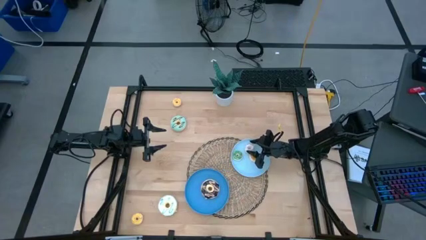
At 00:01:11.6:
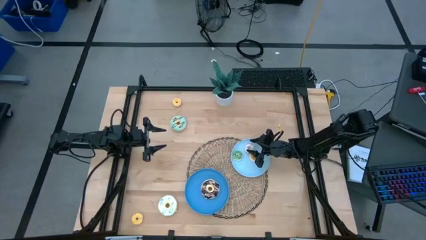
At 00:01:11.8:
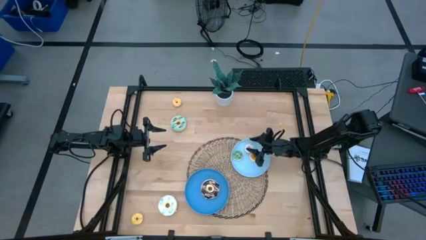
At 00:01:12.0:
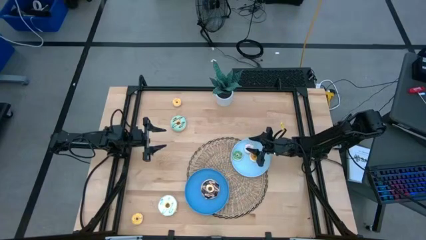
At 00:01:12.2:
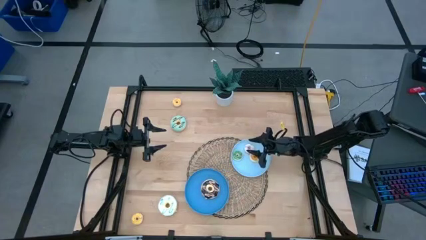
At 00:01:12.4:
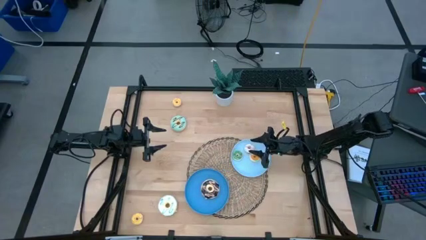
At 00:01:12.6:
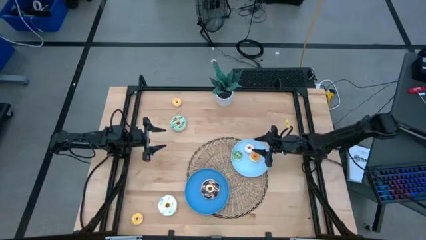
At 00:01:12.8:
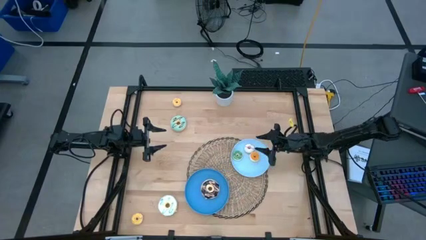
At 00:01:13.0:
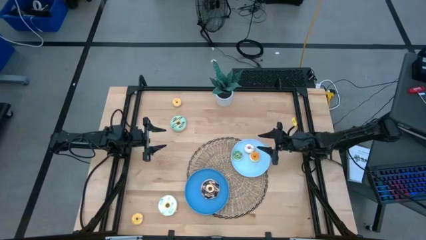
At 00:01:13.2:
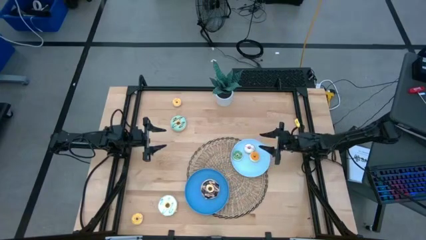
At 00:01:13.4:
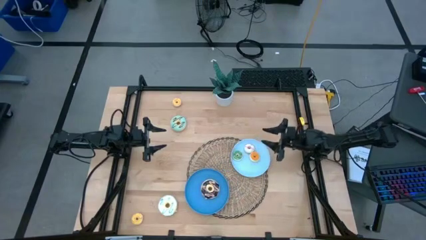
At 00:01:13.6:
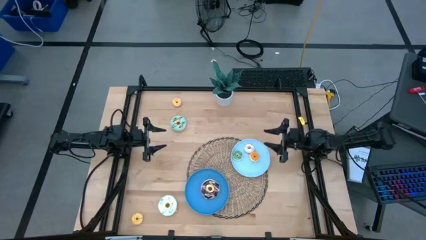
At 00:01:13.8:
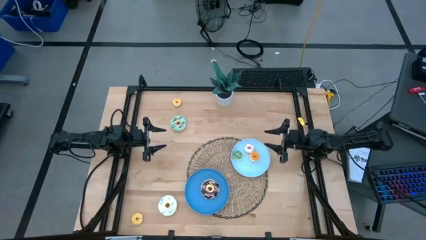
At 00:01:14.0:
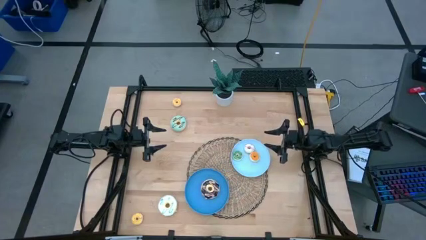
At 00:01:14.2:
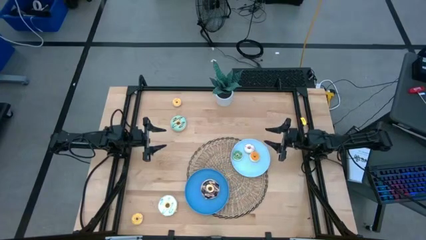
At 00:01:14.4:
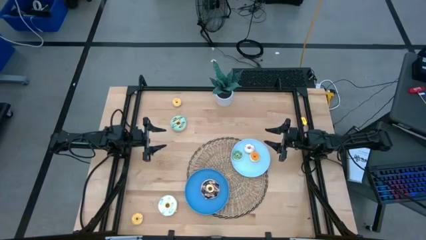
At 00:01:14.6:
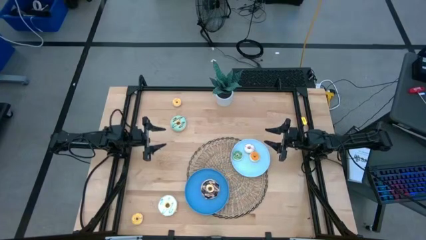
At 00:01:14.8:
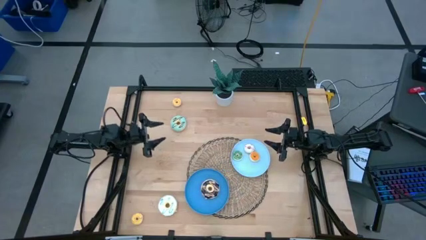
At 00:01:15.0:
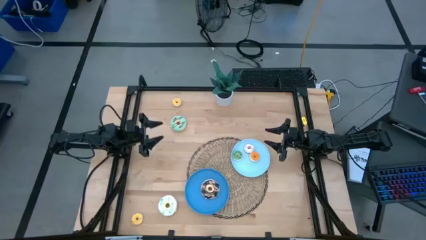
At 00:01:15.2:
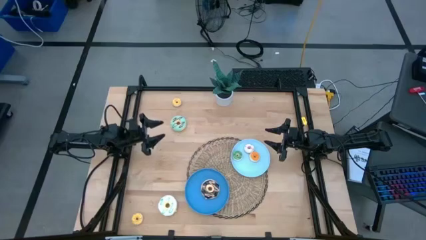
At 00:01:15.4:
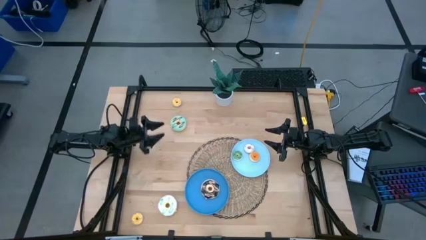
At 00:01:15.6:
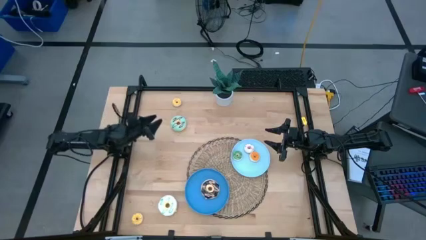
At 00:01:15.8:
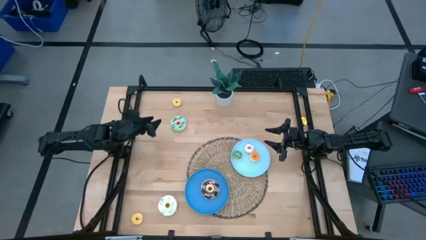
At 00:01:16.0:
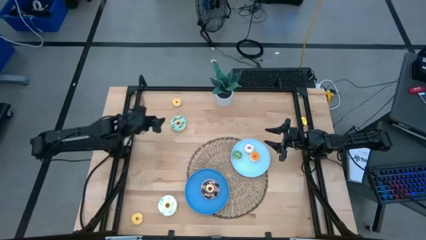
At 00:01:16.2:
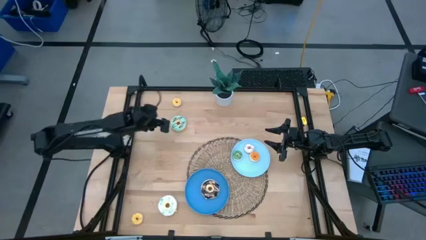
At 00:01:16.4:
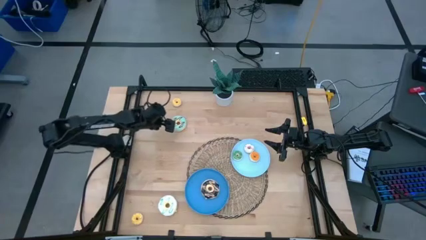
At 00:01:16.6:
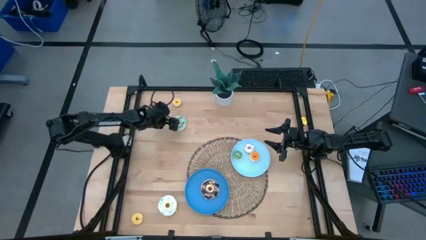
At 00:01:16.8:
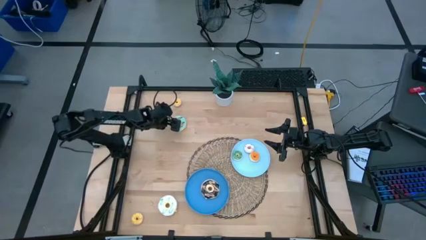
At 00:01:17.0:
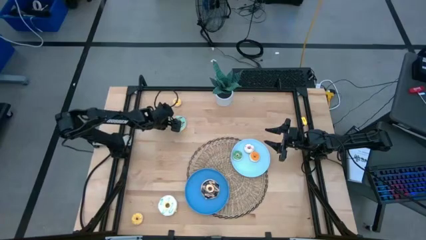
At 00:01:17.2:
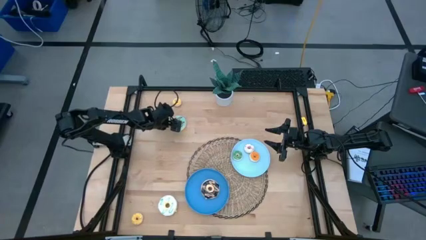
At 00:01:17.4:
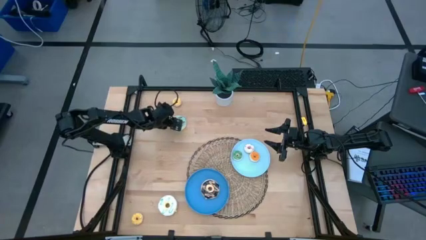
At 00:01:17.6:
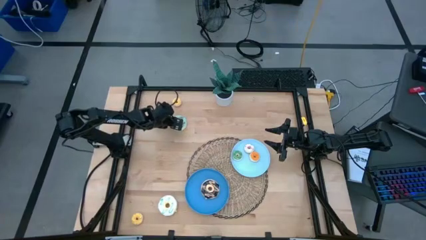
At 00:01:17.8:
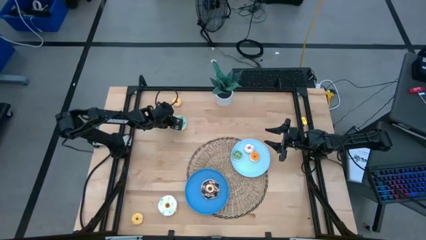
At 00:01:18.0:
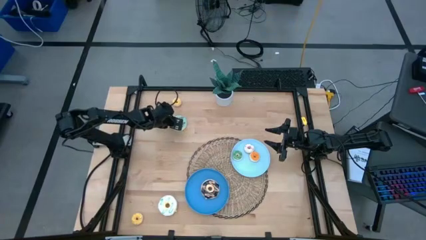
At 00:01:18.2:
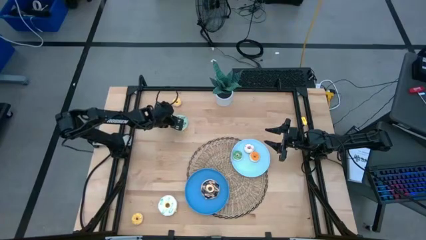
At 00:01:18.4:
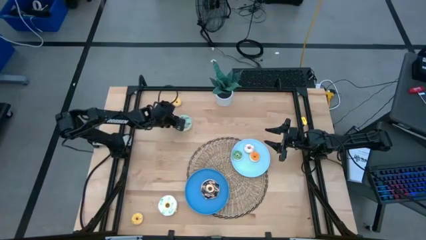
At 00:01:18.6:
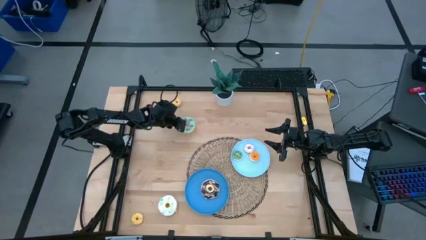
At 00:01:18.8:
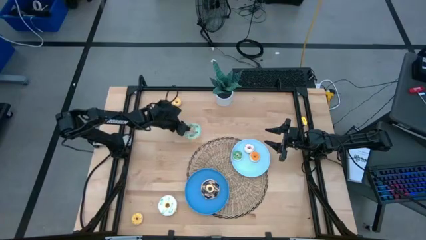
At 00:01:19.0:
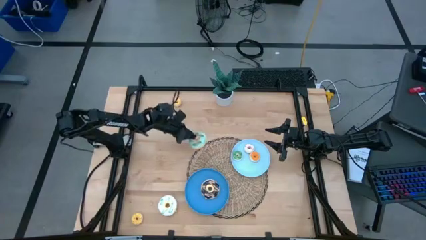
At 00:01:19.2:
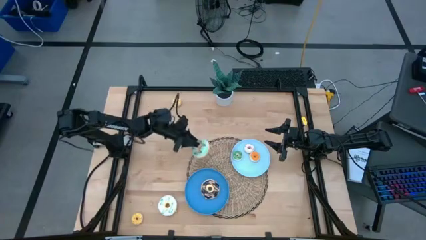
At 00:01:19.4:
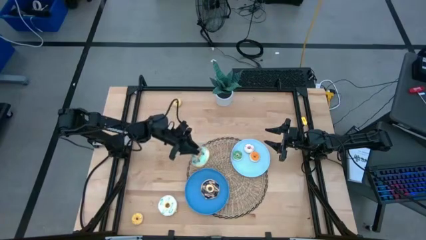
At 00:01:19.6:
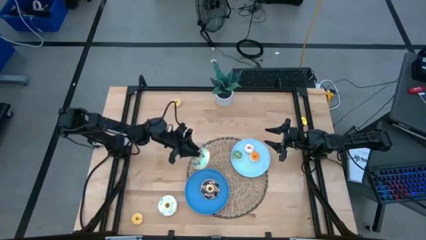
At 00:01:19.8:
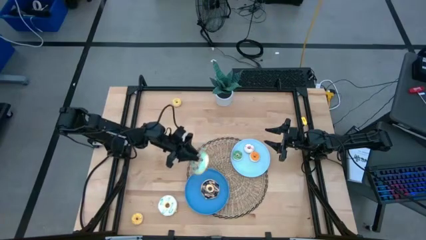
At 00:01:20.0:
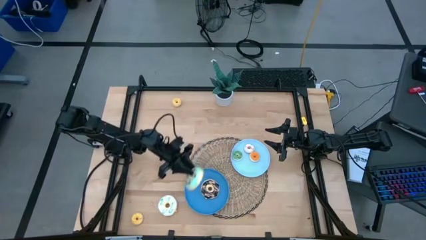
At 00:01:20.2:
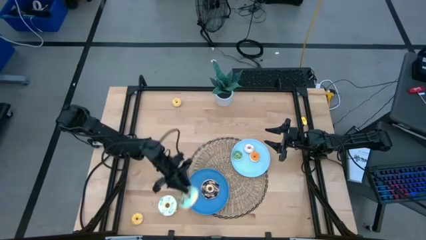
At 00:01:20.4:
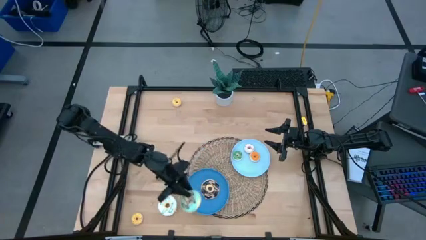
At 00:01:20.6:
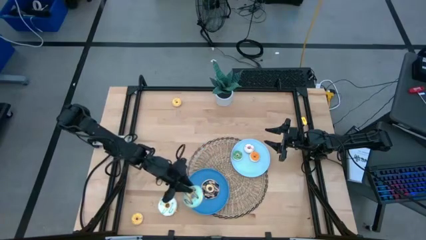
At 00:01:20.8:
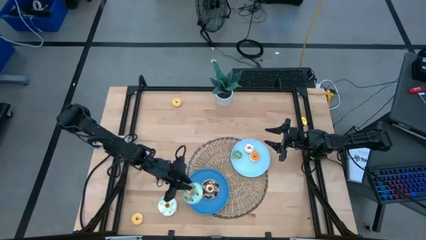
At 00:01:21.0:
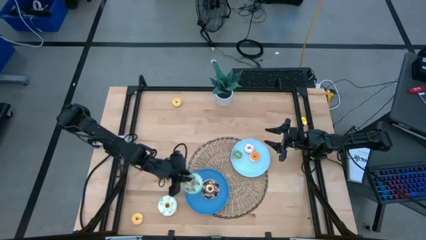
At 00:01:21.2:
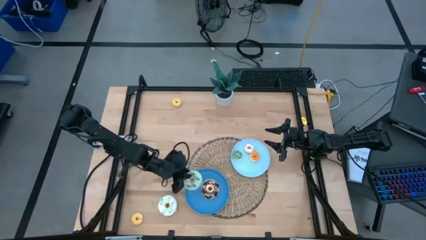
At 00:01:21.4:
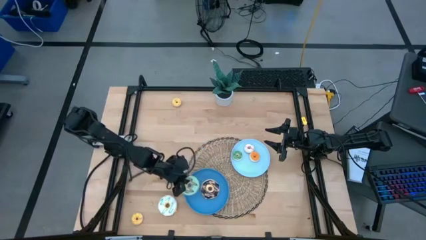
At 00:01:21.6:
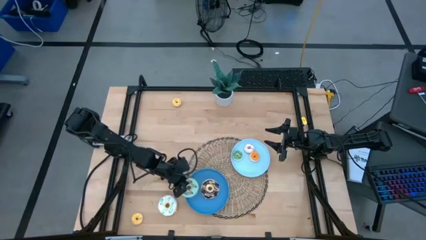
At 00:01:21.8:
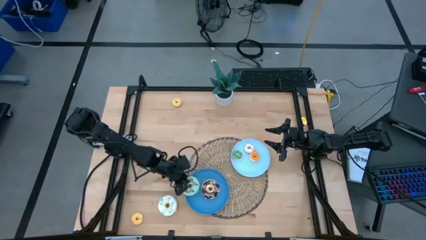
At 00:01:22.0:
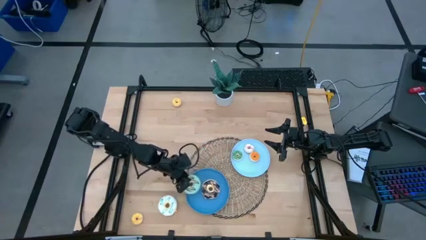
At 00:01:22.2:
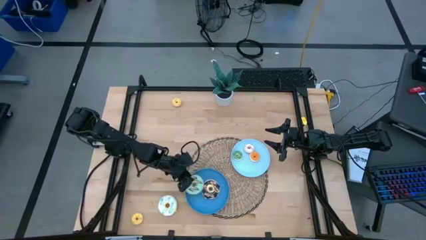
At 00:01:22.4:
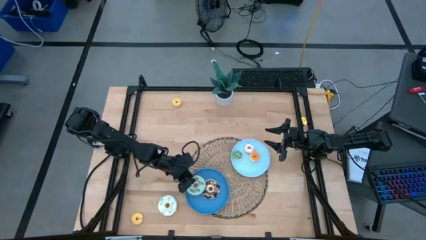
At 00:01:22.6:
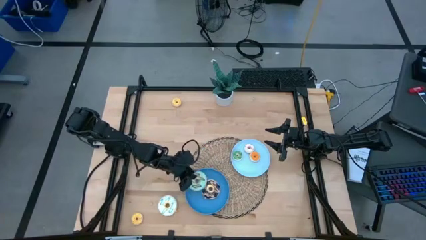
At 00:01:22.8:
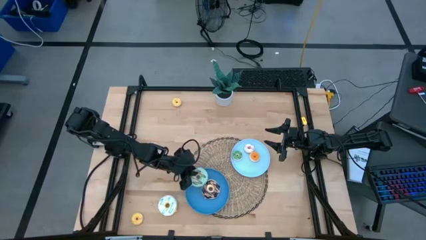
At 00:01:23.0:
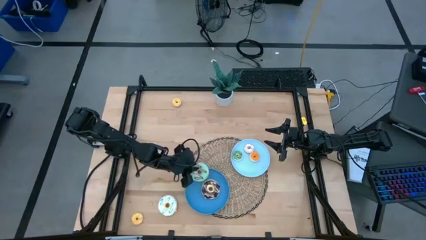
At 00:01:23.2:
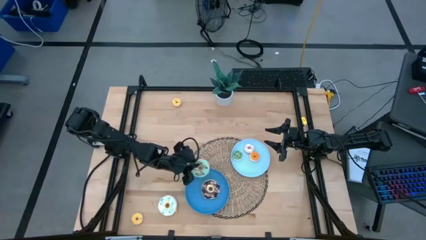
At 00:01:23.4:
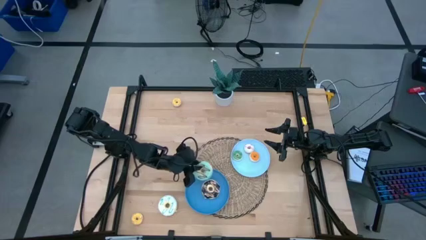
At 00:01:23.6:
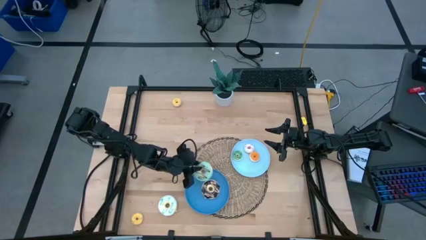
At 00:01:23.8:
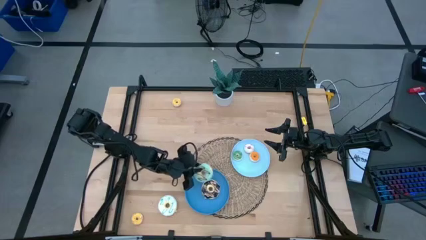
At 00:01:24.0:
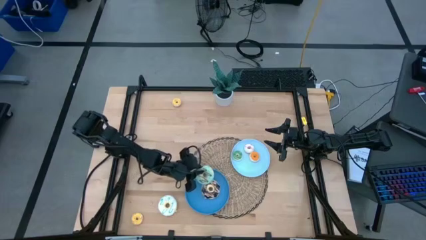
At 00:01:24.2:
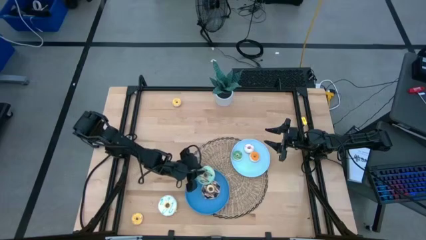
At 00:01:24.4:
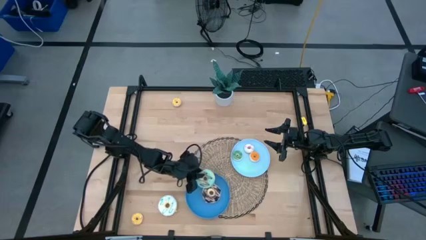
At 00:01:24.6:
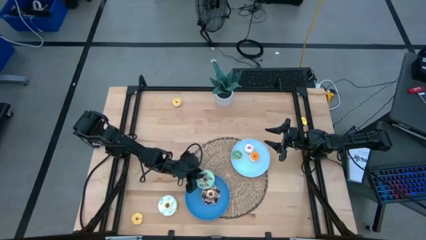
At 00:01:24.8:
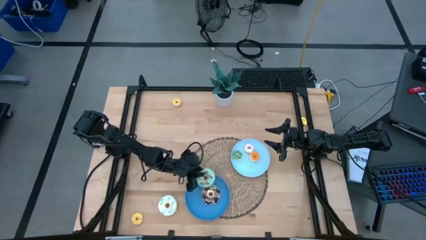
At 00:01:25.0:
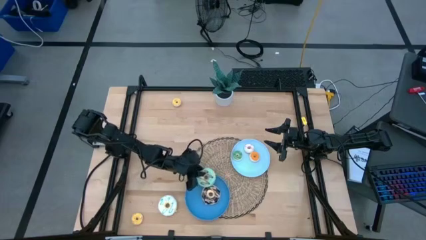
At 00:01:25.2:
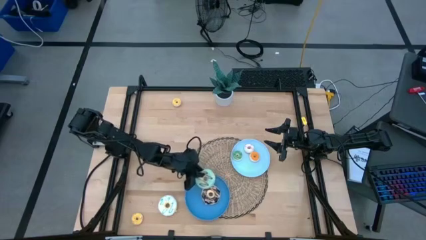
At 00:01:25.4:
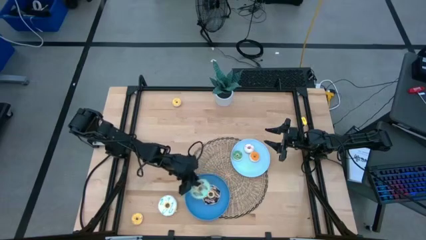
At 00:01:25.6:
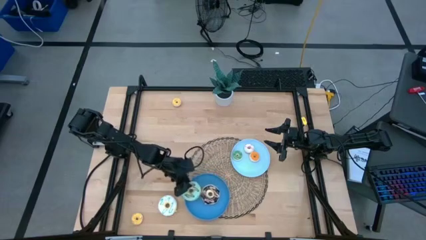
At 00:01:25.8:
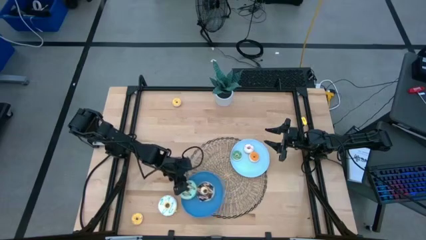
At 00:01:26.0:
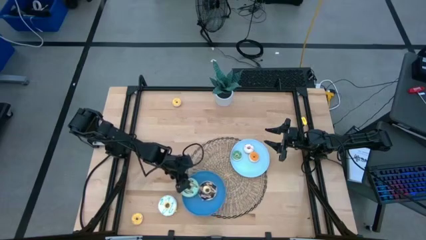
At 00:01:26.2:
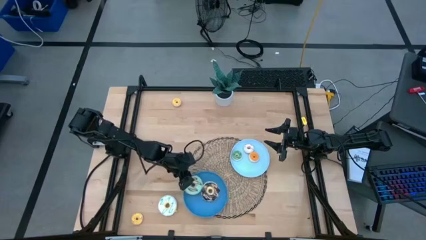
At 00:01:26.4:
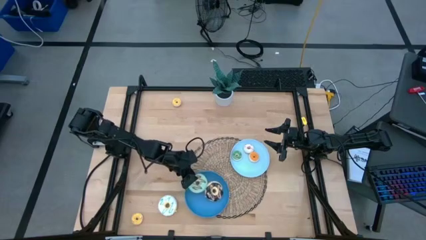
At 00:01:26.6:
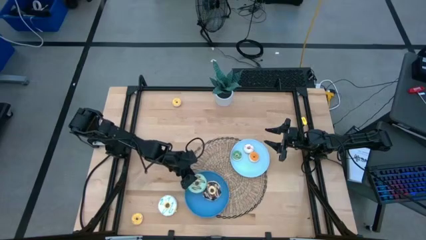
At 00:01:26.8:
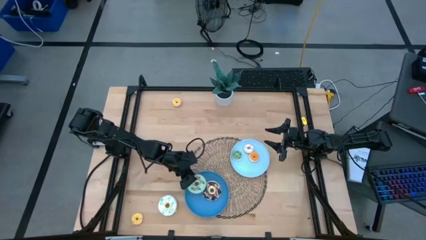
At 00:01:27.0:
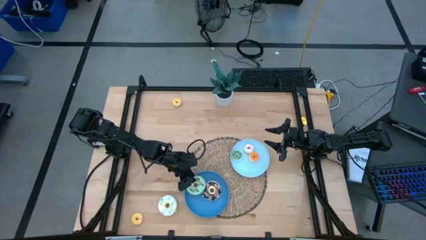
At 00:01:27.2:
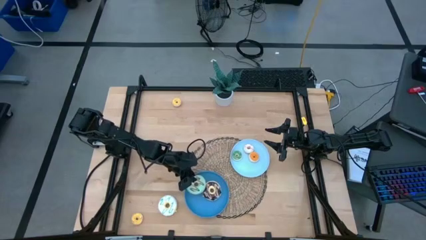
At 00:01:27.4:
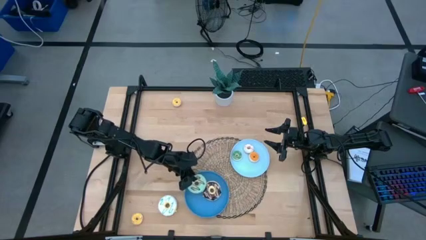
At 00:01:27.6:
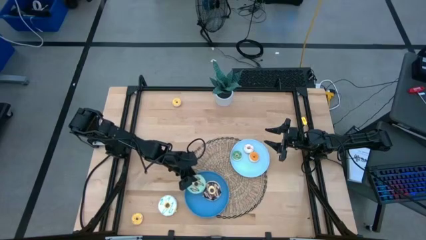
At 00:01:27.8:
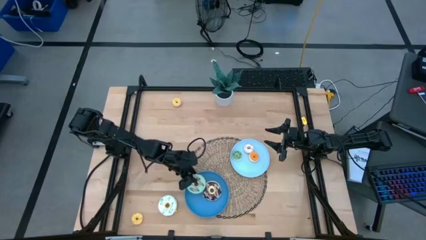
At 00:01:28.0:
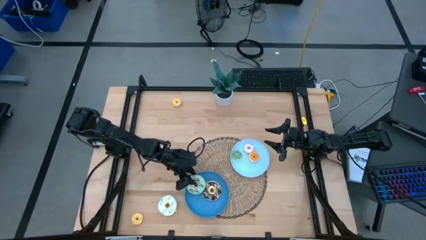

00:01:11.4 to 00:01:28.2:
Task: Pick & Place donuts
Put the large light blue donut on the blue plate
